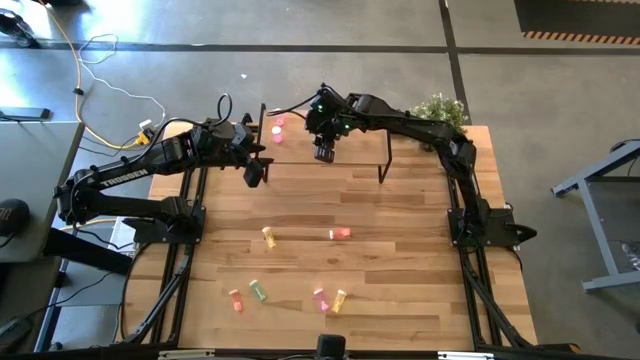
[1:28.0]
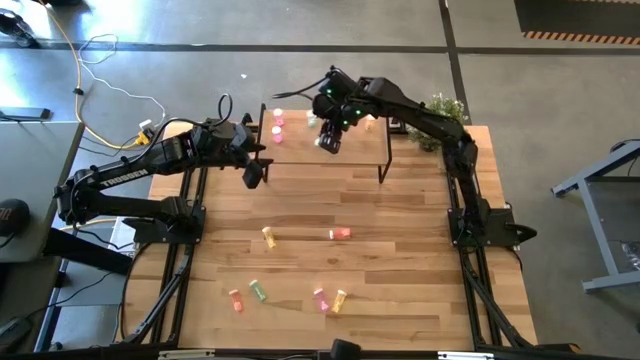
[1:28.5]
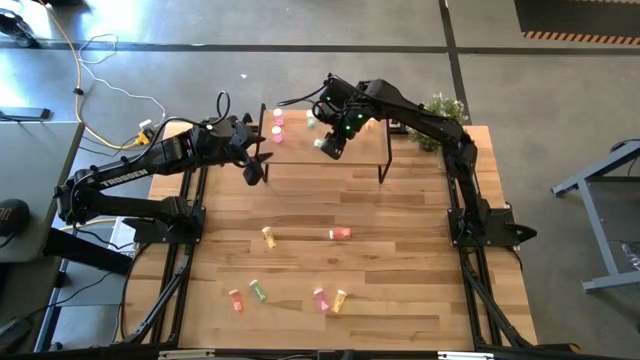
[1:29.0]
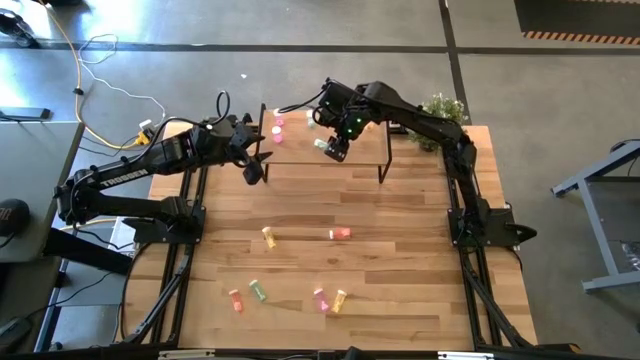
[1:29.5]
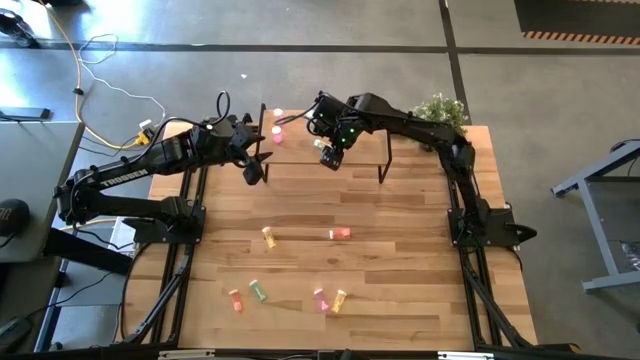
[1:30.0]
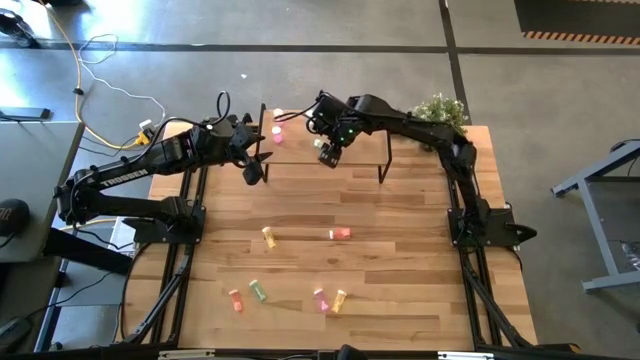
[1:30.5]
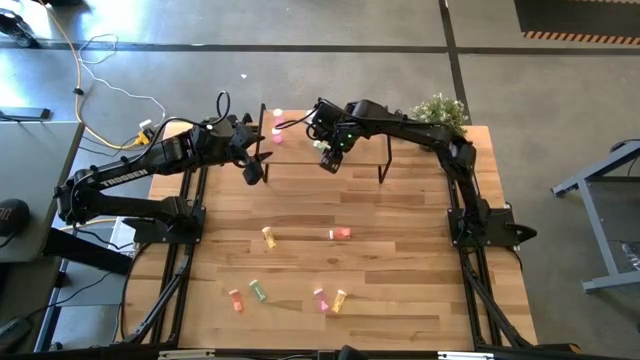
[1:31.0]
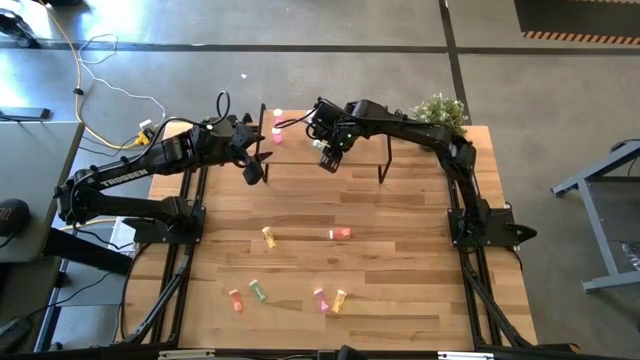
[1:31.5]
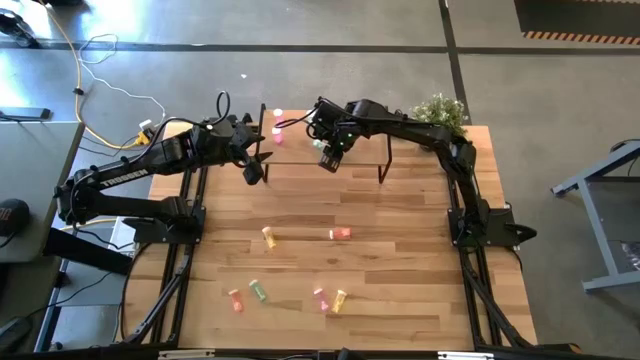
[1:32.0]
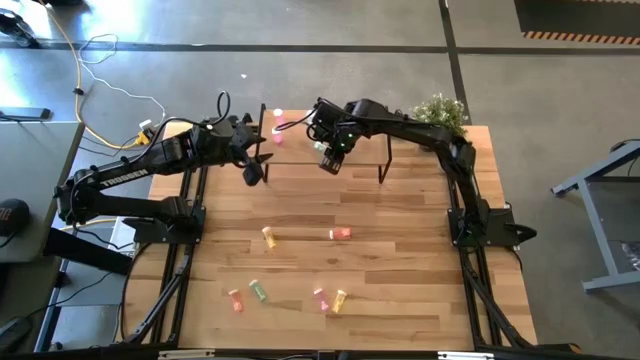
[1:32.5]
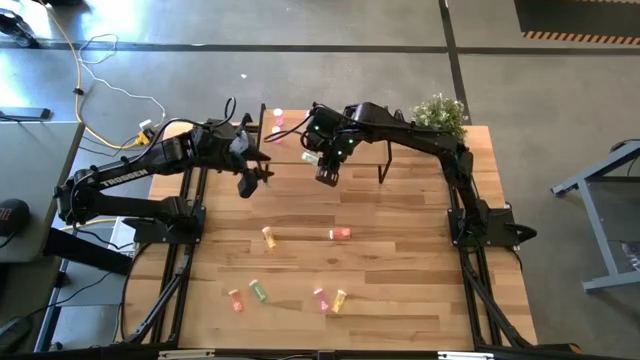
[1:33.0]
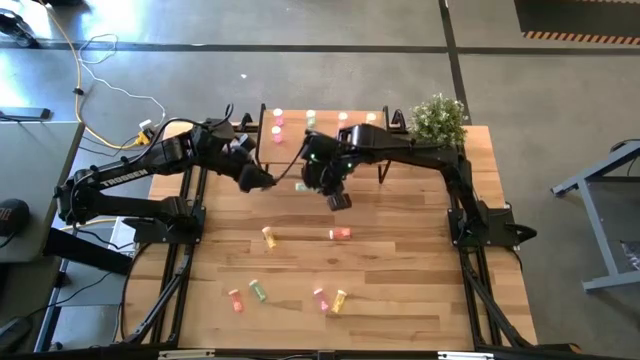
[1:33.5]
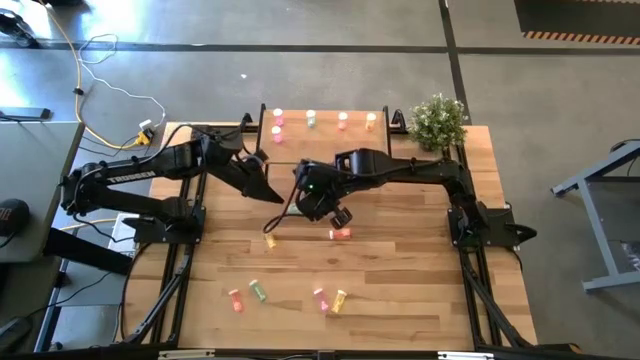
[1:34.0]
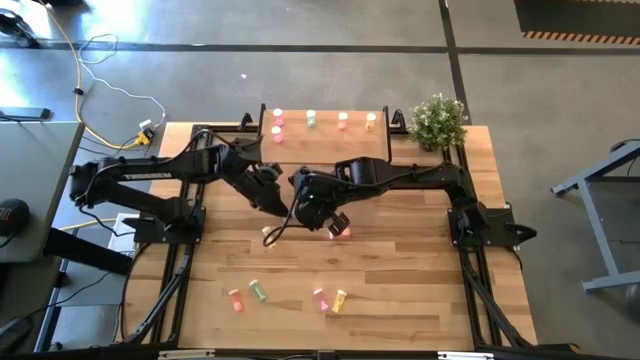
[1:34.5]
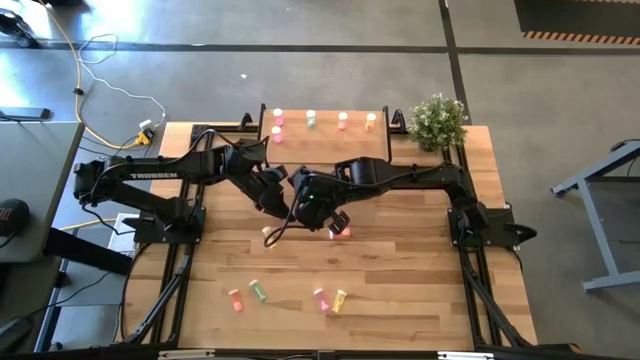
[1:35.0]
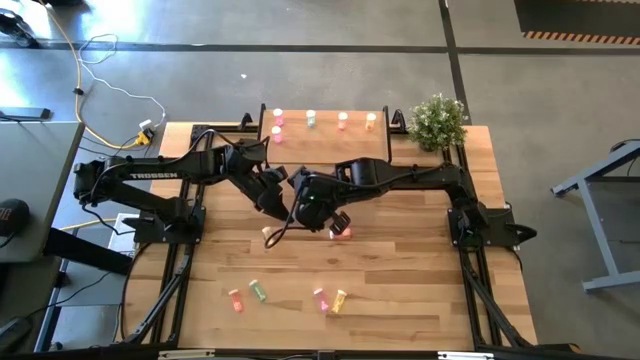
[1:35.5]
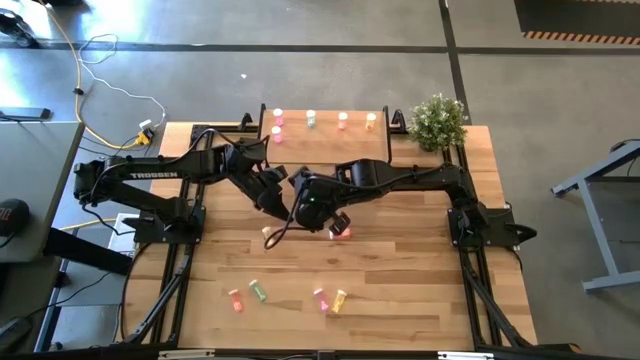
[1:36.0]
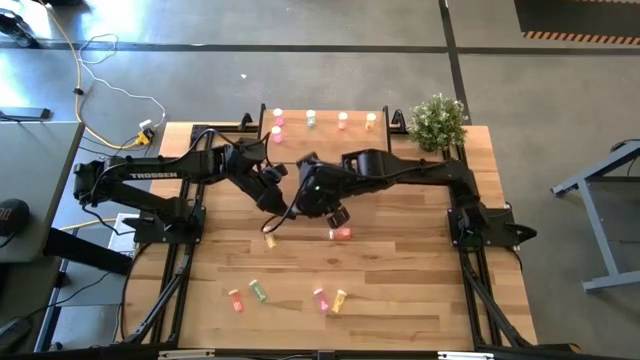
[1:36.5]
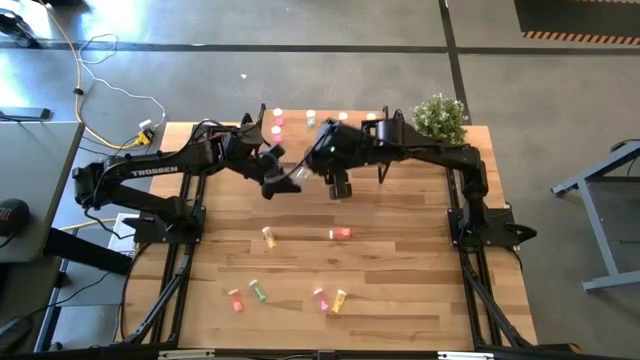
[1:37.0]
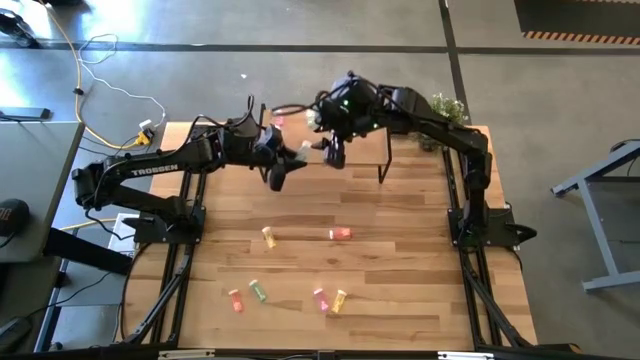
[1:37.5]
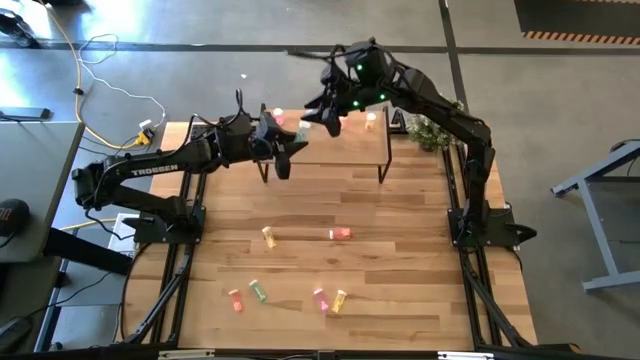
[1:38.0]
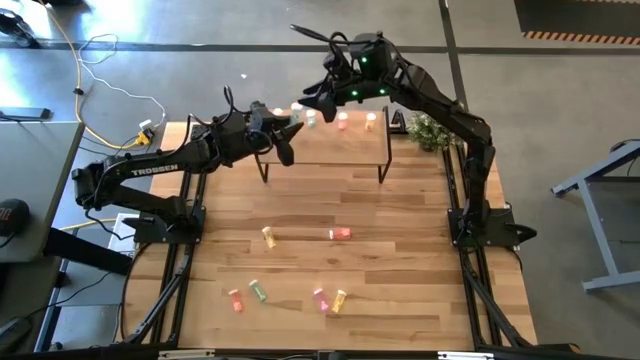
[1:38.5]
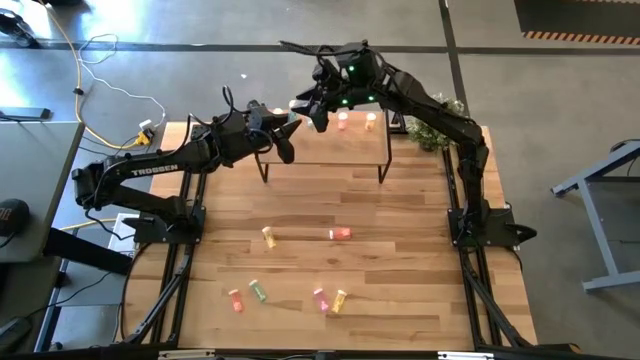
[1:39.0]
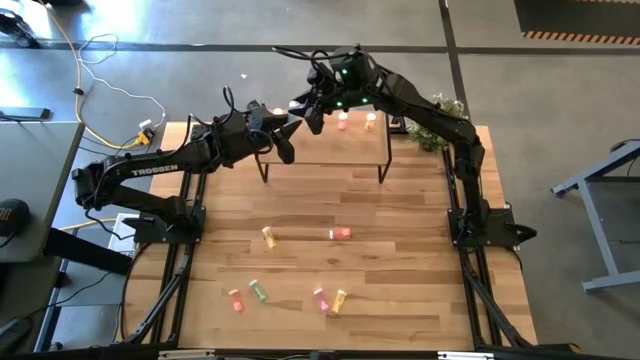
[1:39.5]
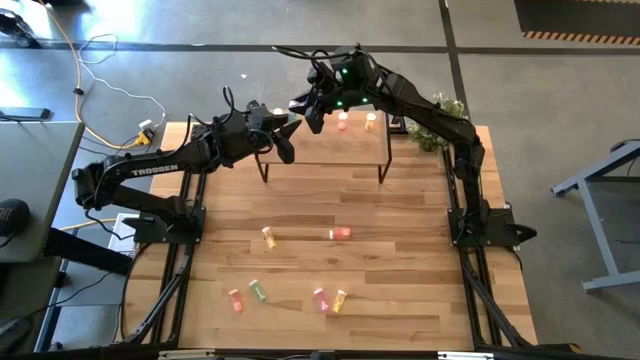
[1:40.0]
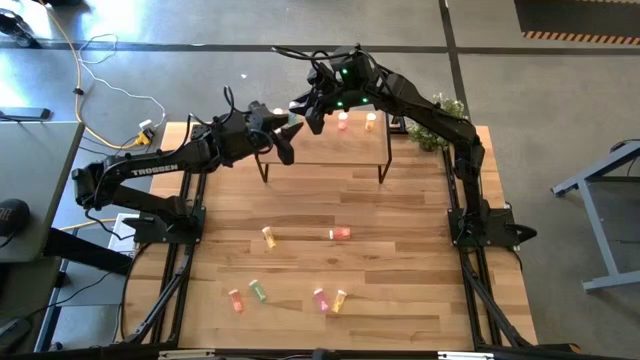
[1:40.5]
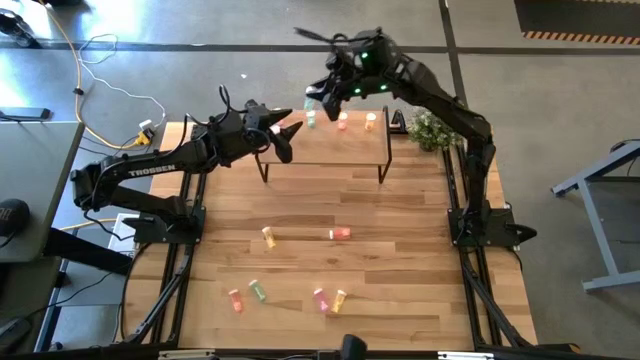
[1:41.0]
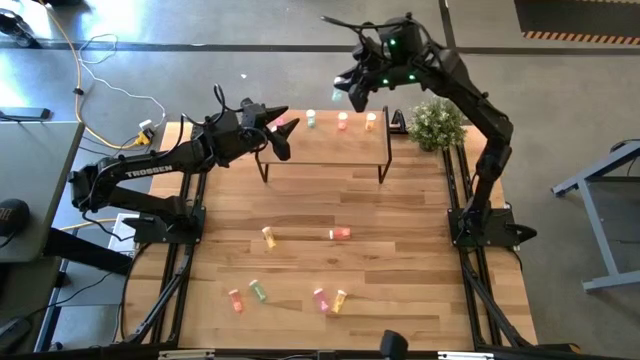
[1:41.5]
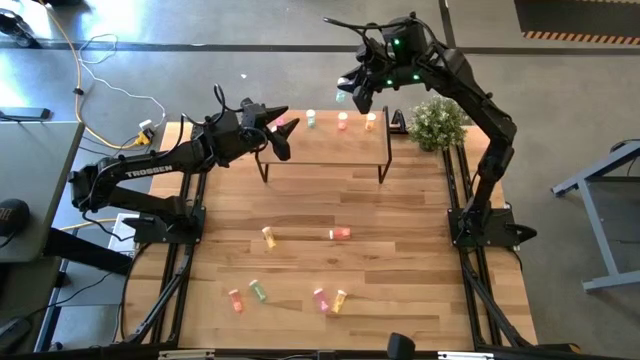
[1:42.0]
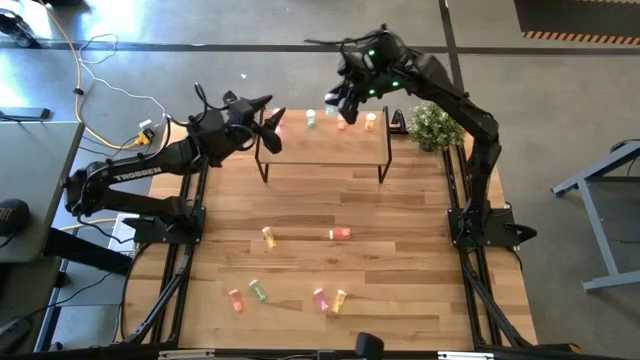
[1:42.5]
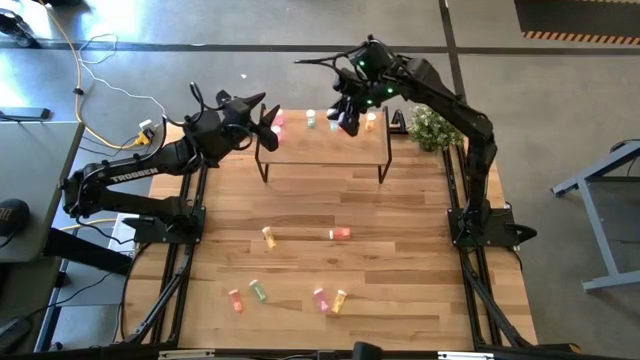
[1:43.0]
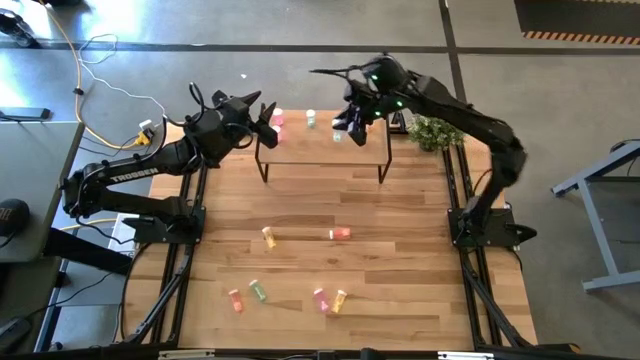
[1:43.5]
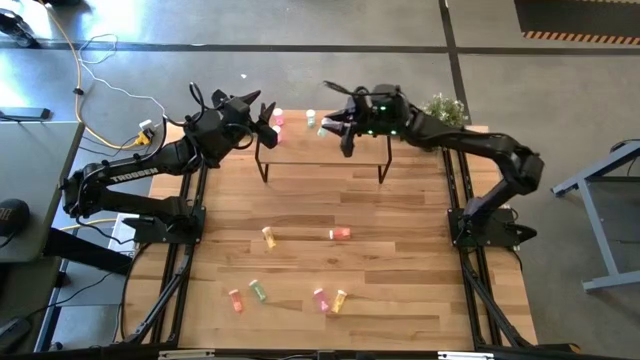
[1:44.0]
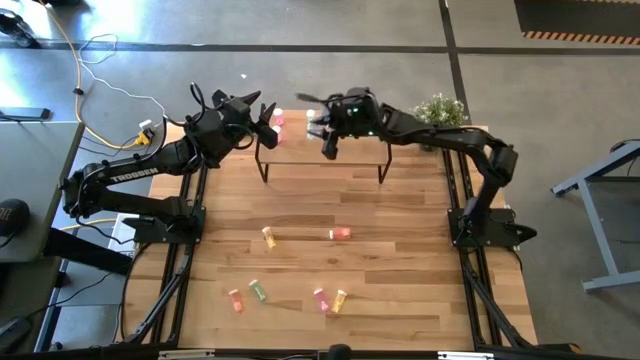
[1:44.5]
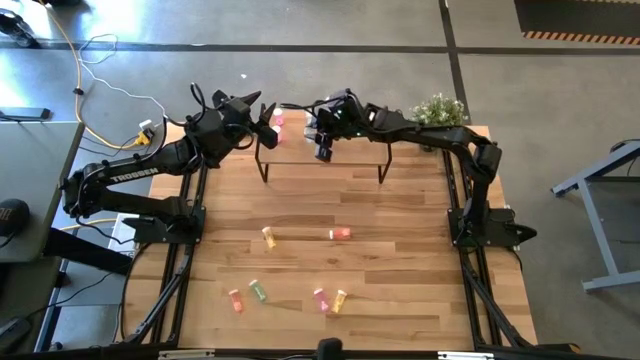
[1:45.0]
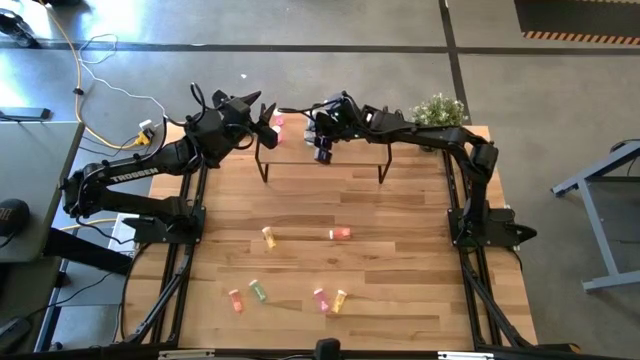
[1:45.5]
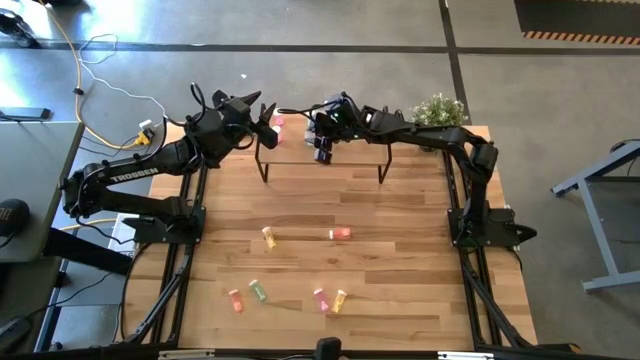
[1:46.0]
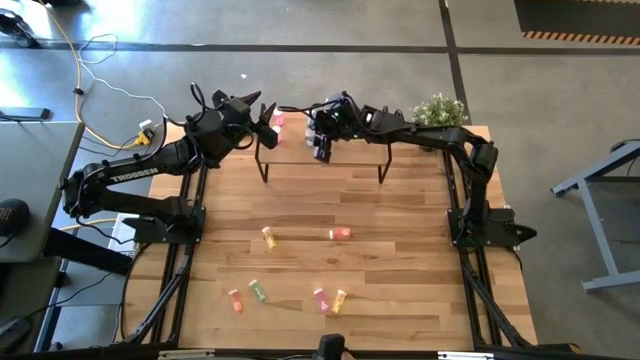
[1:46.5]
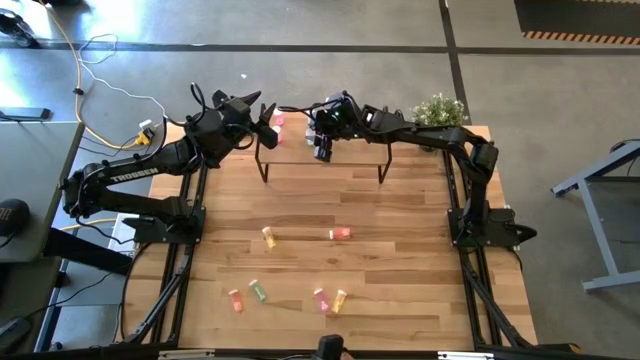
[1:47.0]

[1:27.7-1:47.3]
Task: Pick and place medicine bottles onto shelf by color
Put the top blue pill bottle on the shelf aligned with the other blue pill bottle
